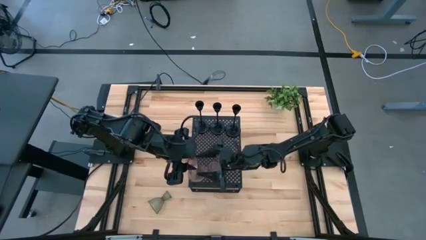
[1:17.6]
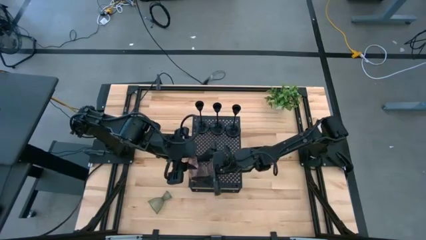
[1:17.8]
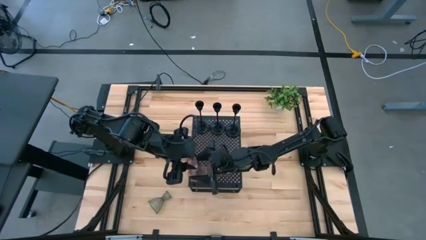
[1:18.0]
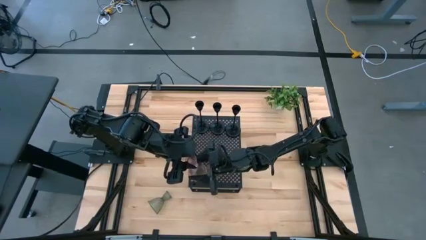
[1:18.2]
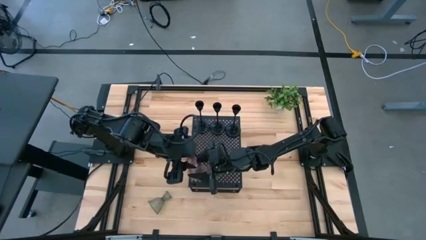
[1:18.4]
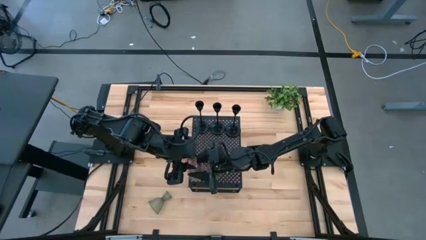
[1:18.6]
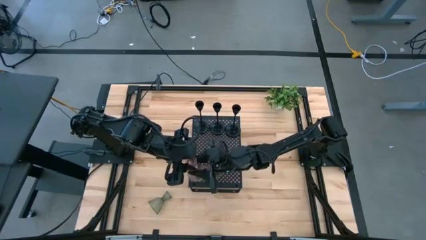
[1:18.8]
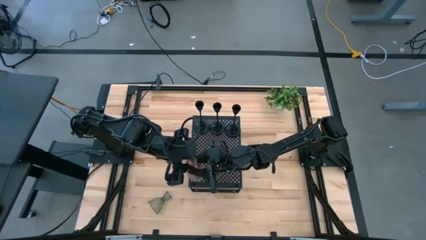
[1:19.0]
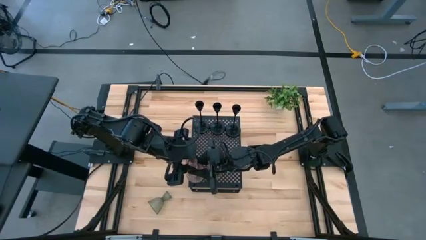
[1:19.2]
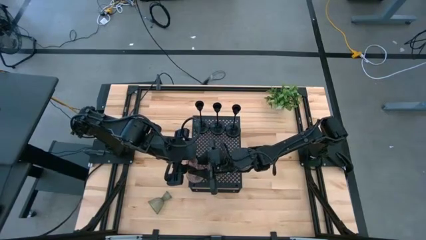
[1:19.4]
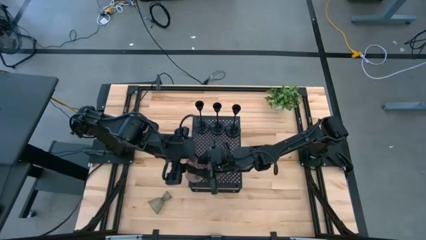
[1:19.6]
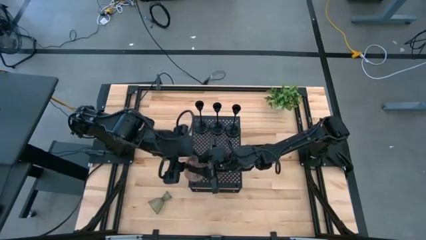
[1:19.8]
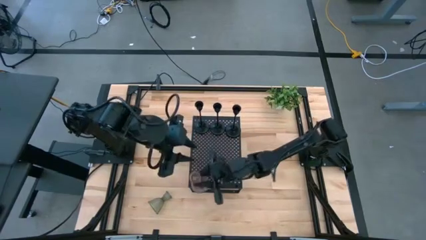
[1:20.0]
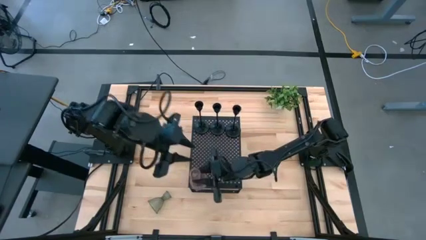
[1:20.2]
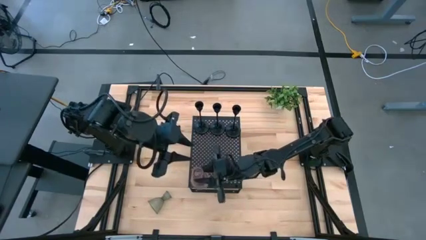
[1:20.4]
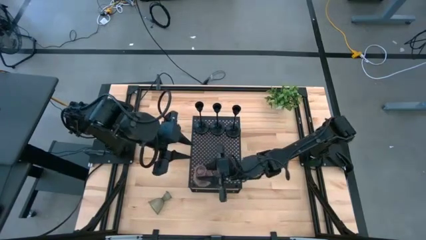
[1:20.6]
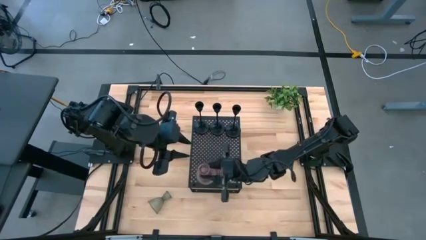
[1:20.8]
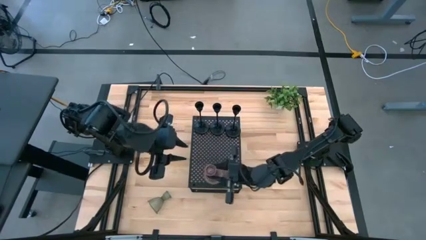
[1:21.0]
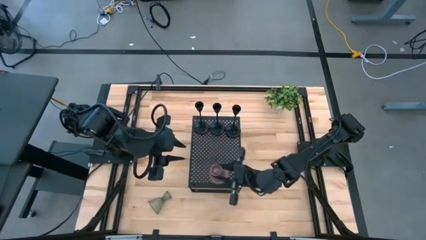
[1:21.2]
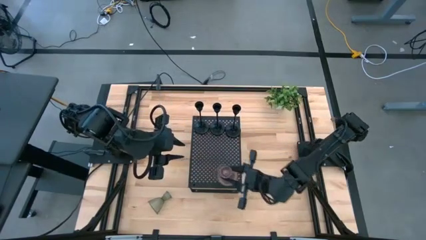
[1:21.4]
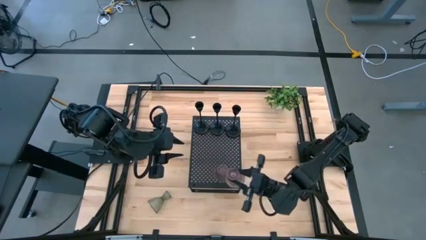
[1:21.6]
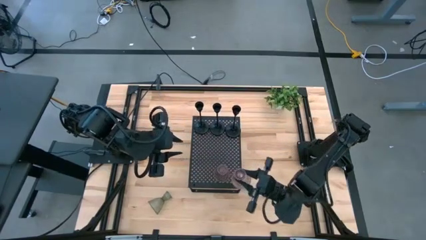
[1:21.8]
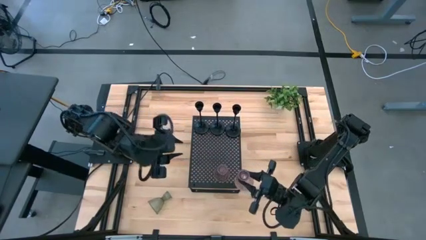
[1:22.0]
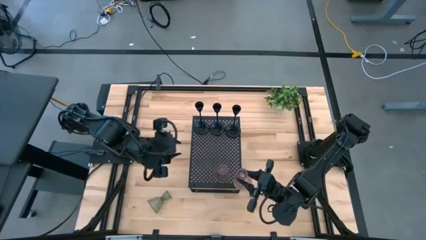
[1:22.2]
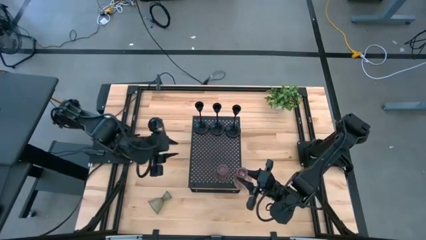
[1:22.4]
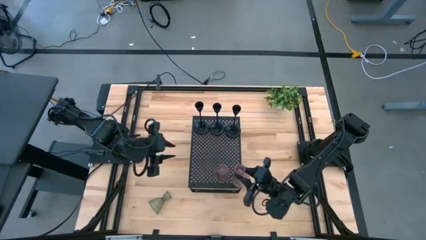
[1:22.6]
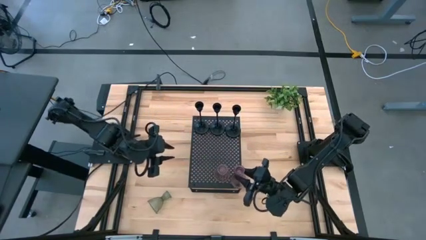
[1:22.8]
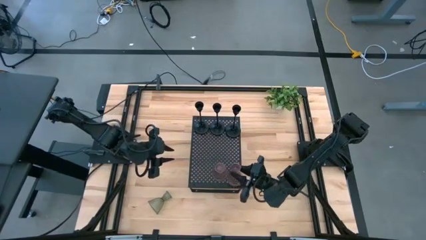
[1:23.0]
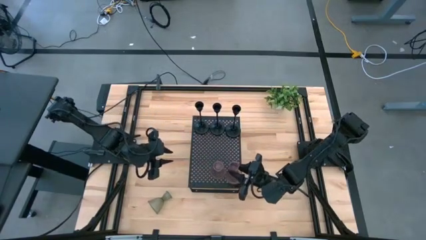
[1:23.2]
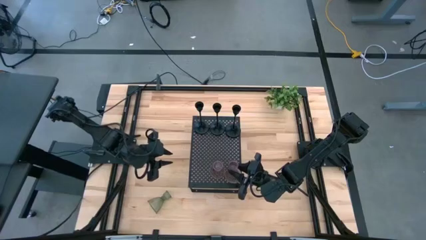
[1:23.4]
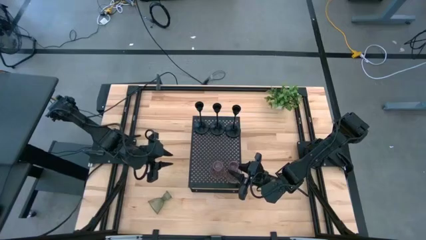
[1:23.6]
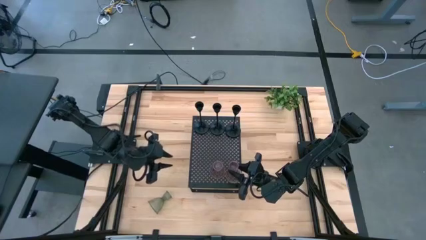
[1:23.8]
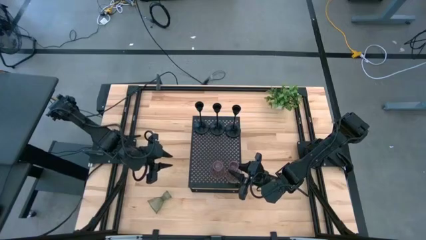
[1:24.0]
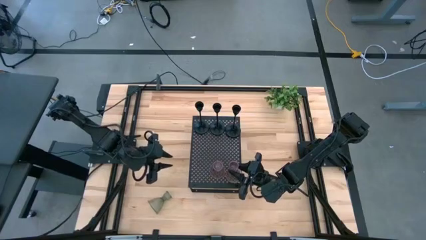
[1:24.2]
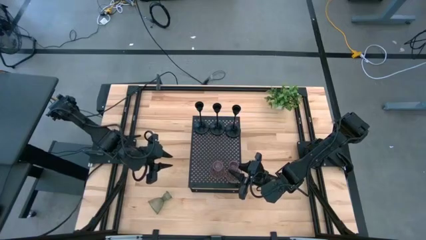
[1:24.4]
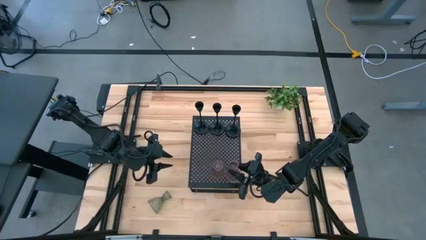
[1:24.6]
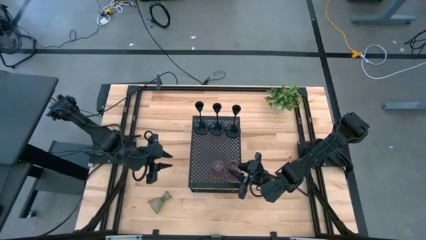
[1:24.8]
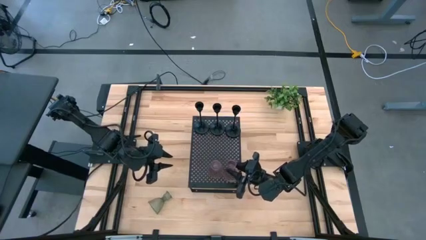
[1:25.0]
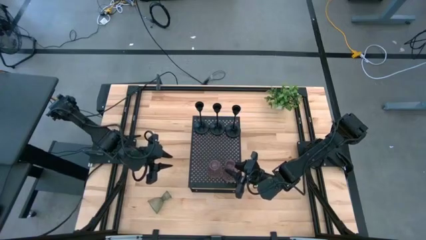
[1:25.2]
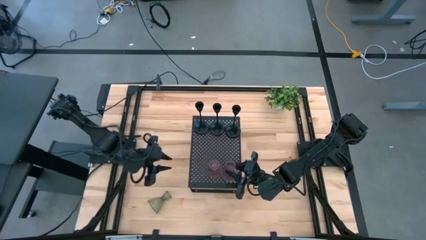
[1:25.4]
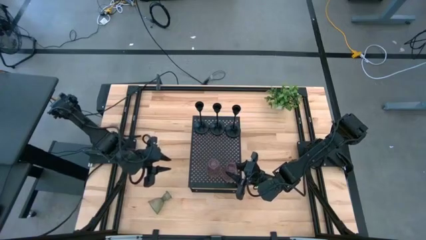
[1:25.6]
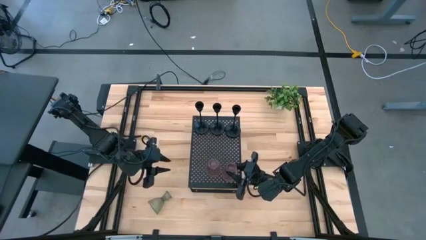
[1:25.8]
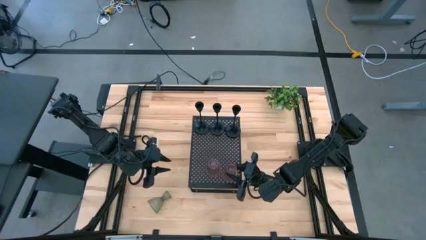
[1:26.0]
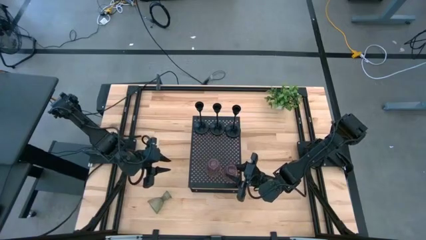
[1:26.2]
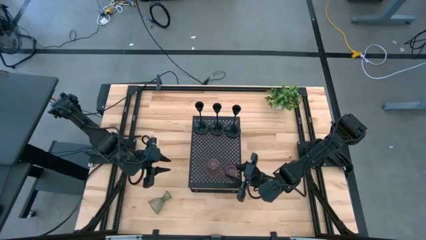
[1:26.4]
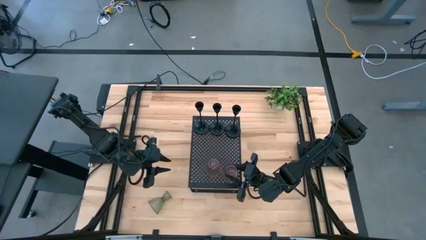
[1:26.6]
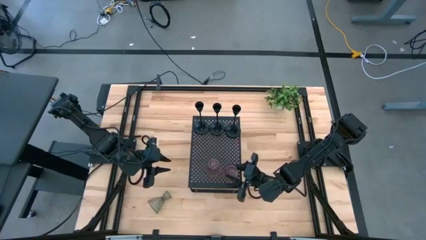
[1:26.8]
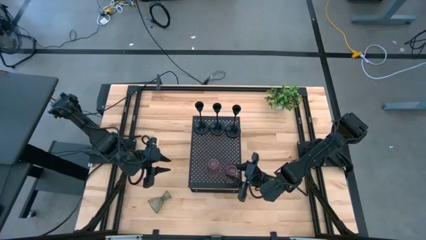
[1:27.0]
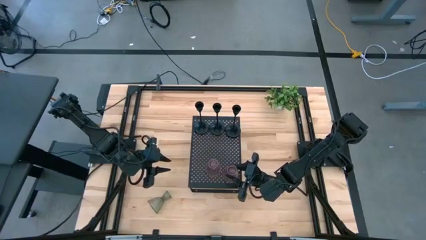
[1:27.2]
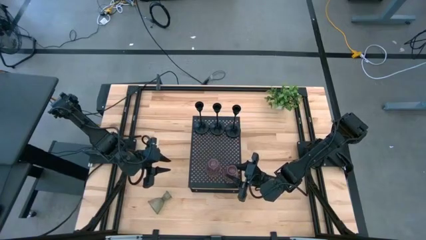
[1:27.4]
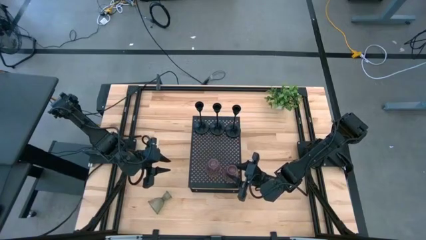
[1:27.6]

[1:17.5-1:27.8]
Task: Pick & Place candle stick holders
Put the pink candle holder on the shelf aligned with the other pink candle holder

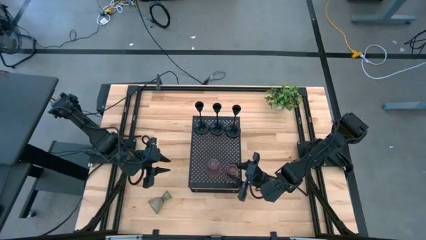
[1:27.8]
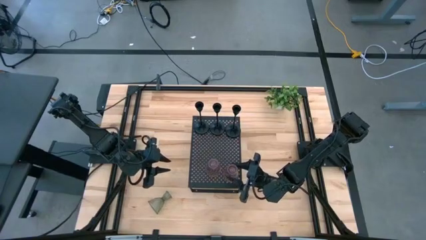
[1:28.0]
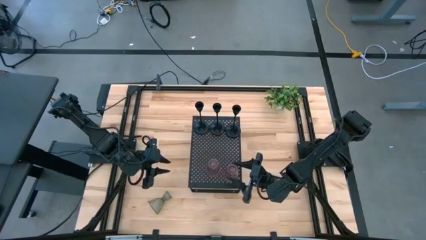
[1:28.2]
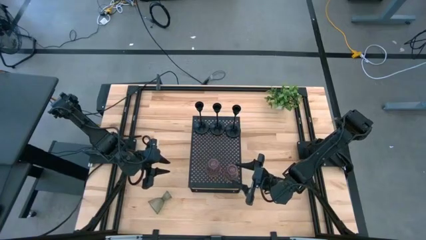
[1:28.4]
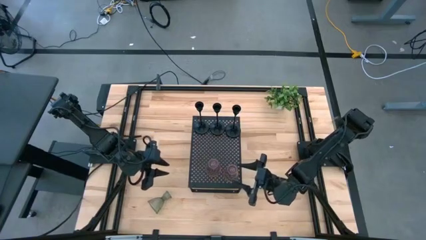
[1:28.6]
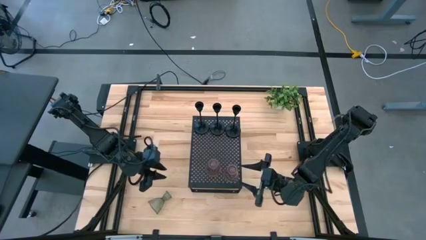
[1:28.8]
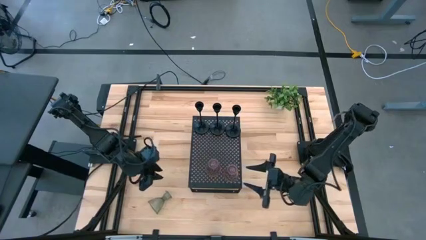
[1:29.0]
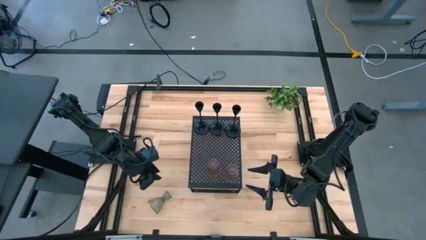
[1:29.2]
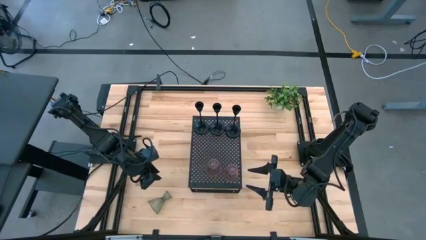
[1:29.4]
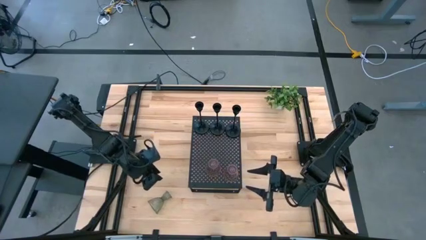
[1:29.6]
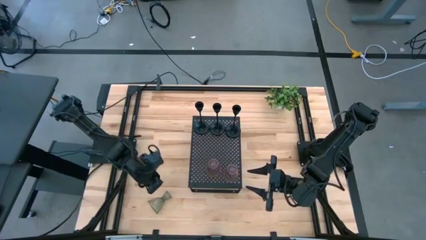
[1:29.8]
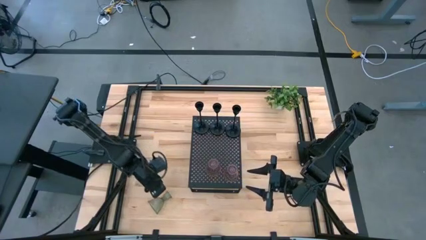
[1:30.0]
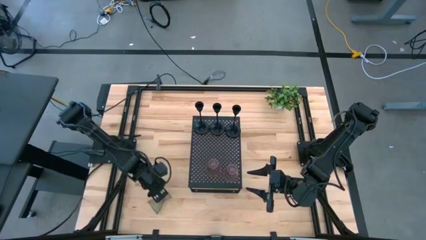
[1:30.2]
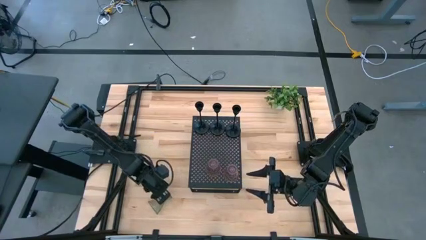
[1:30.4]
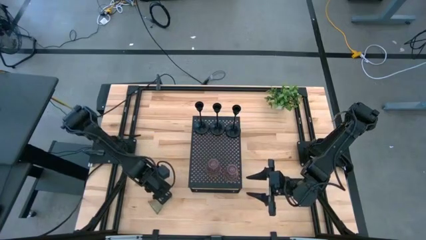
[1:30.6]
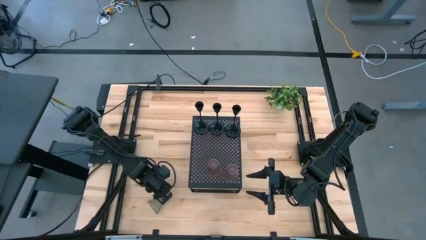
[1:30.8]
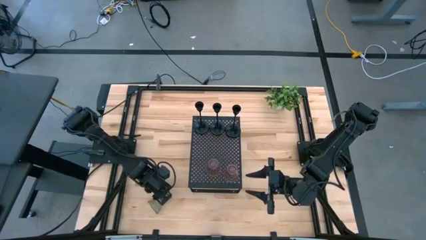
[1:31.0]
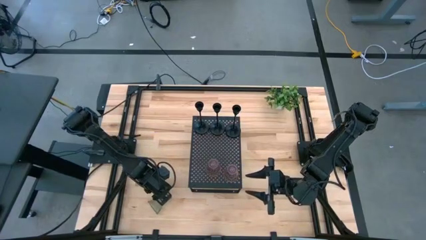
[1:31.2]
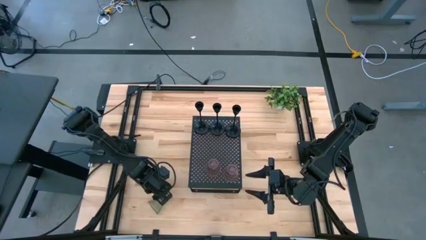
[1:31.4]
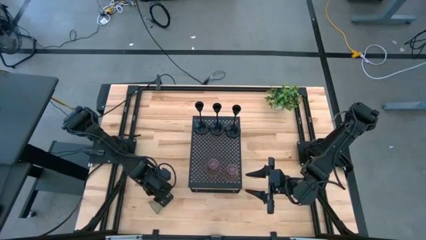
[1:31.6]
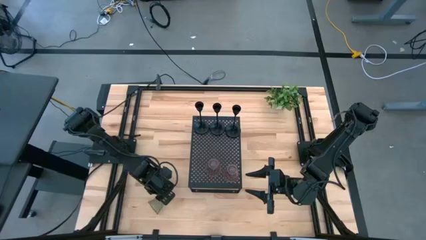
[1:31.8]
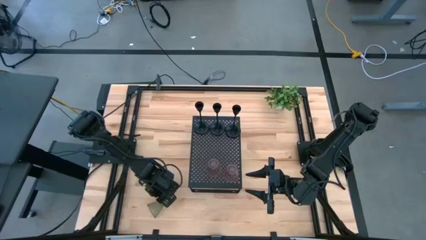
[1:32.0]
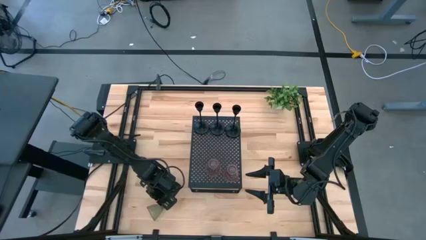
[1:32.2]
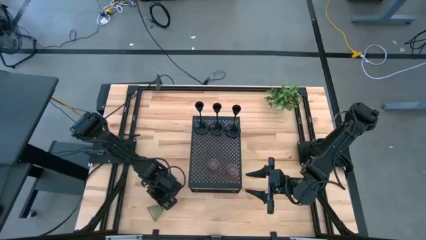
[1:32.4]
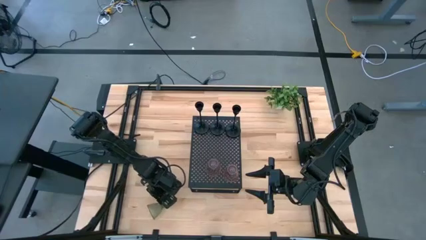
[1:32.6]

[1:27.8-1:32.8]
Put the transparent candle holder on the shelf aligned with the other pink candle holders

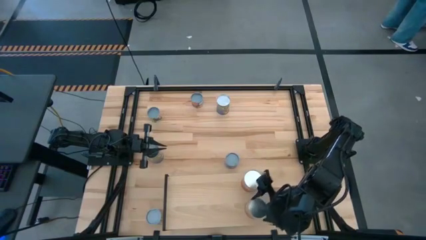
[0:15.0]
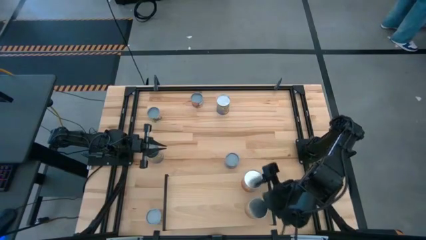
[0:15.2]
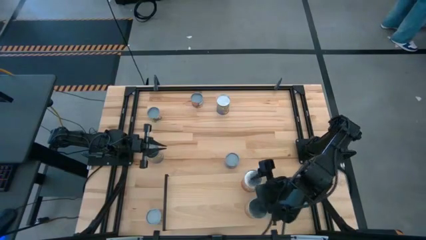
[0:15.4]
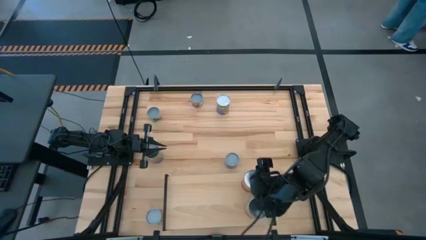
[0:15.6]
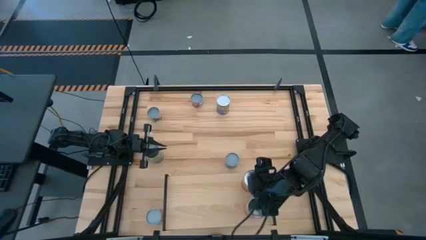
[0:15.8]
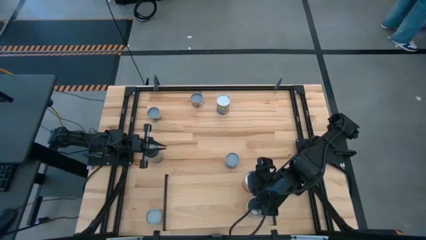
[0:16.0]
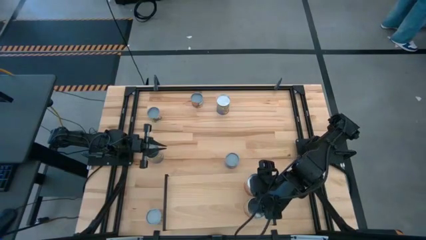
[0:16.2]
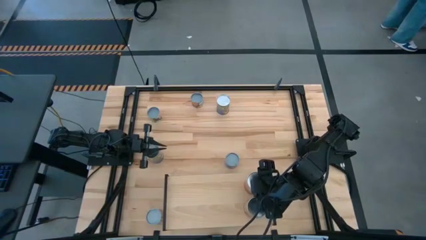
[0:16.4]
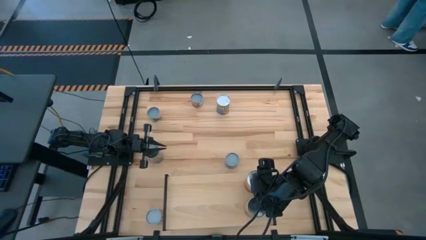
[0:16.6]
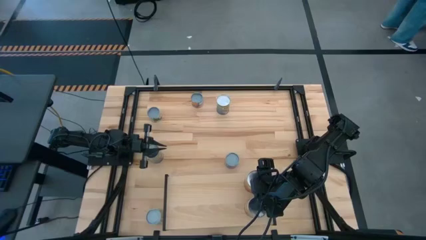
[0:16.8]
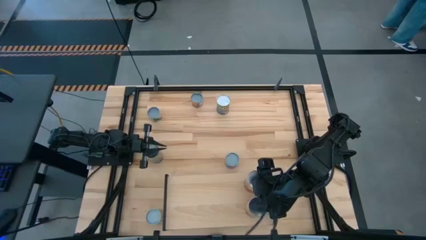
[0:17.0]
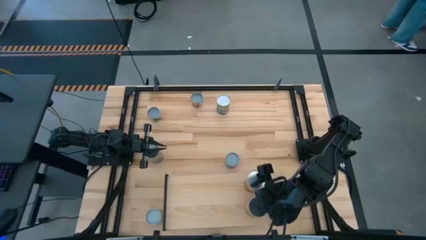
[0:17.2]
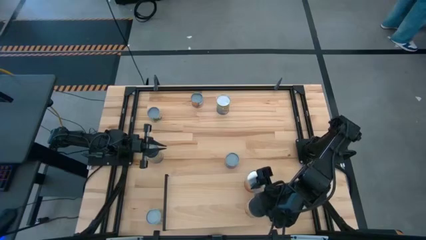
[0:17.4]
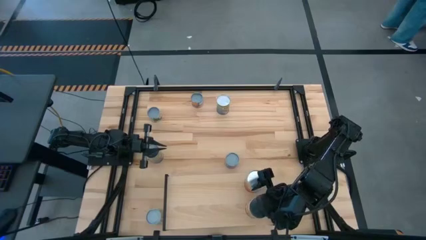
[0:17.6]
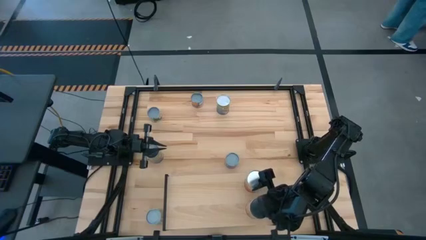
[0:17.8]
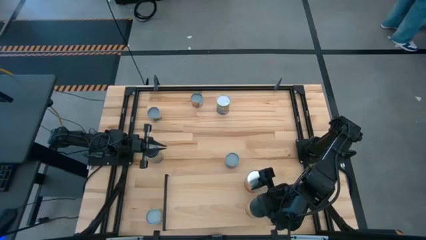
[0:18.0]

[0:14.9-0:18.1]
Task: Pick and place cans onto a shelf
Adjust the large canned corns on the shelf
